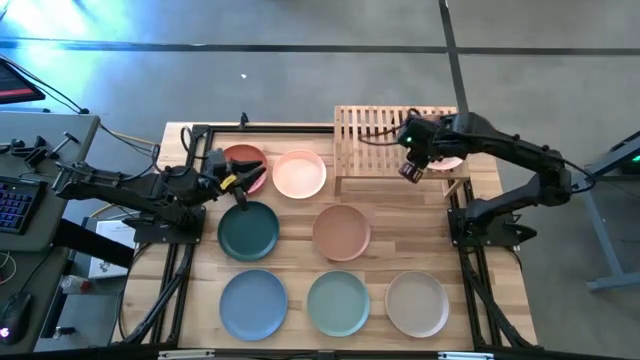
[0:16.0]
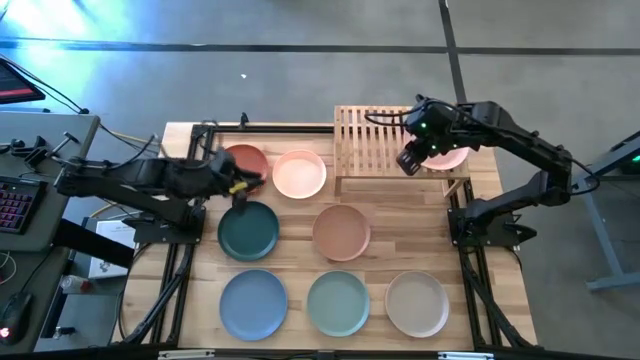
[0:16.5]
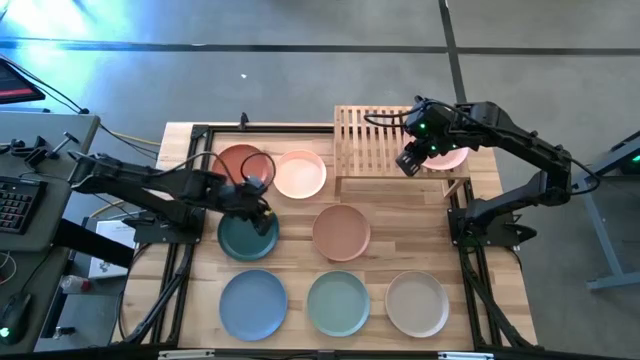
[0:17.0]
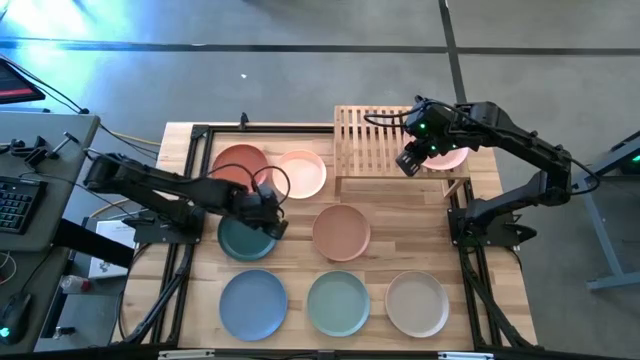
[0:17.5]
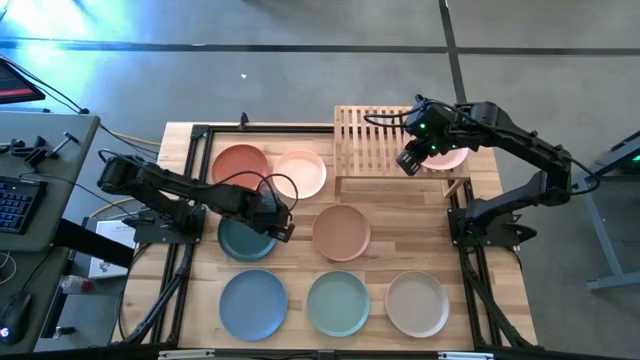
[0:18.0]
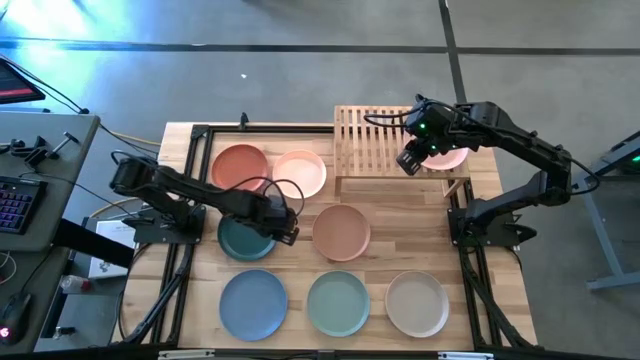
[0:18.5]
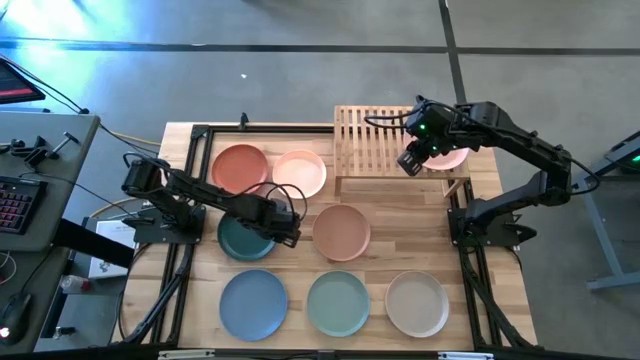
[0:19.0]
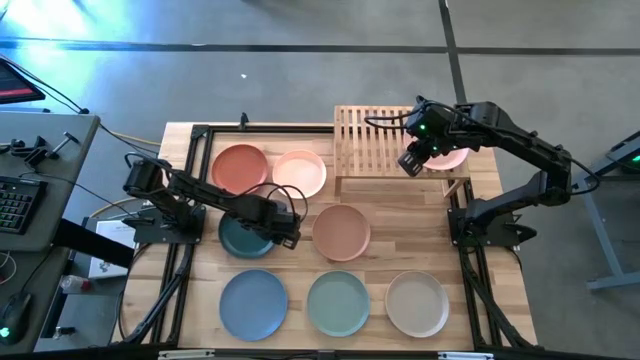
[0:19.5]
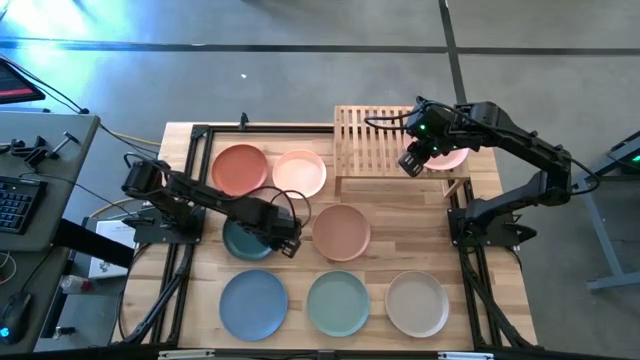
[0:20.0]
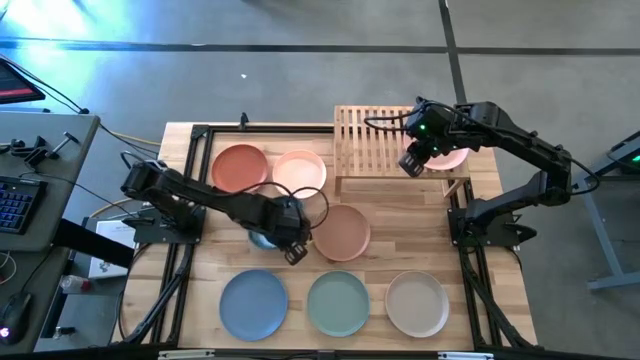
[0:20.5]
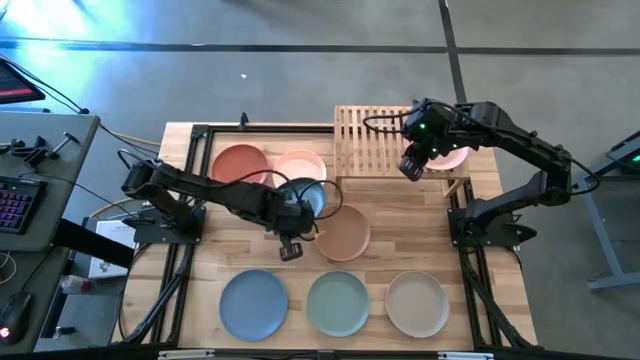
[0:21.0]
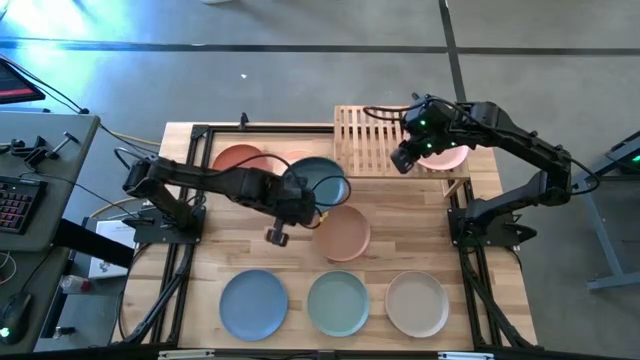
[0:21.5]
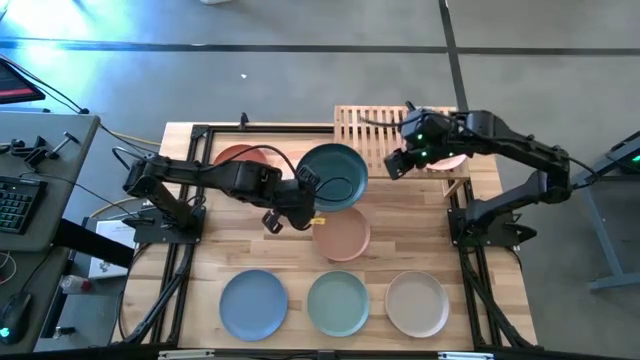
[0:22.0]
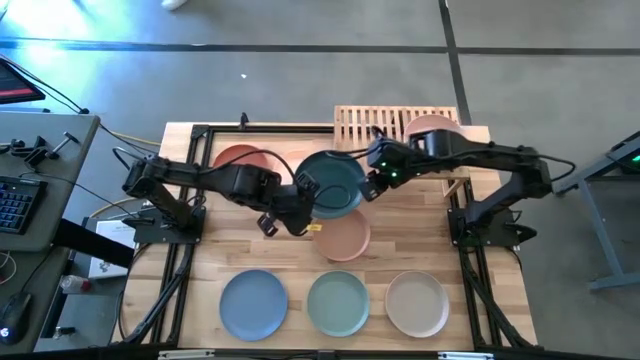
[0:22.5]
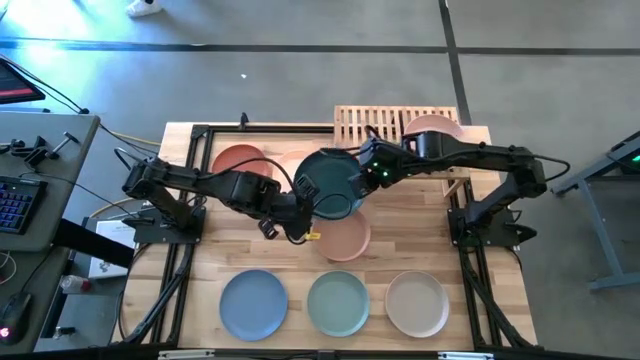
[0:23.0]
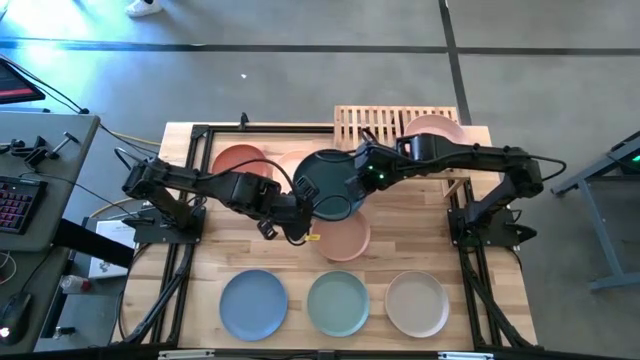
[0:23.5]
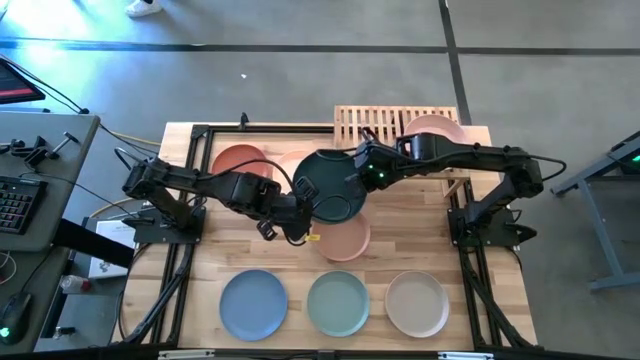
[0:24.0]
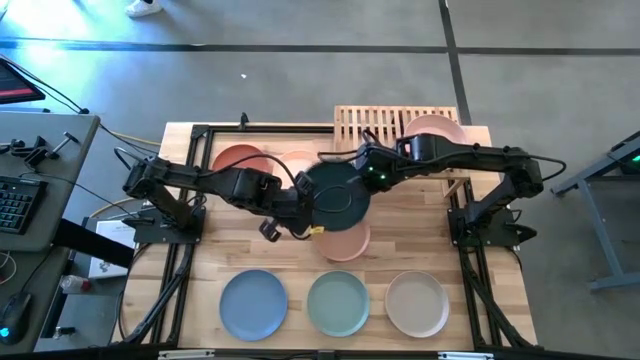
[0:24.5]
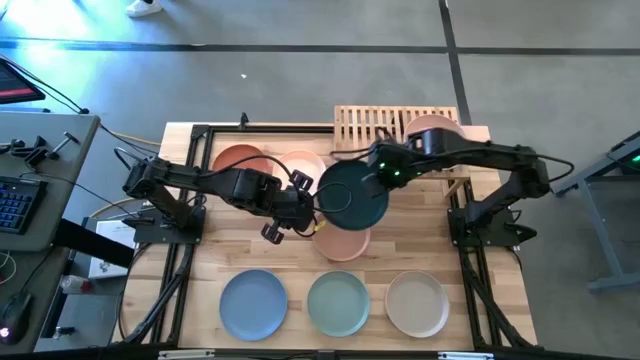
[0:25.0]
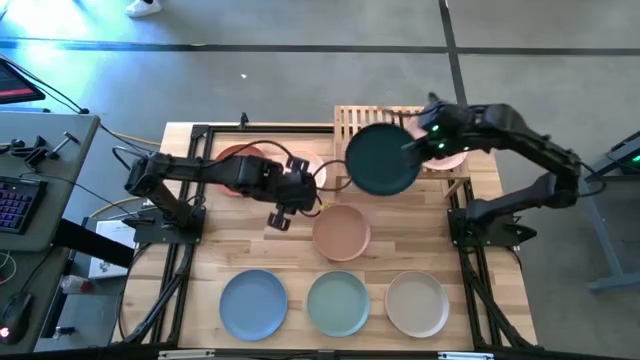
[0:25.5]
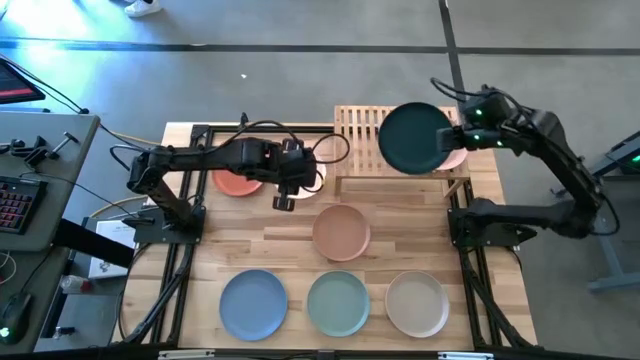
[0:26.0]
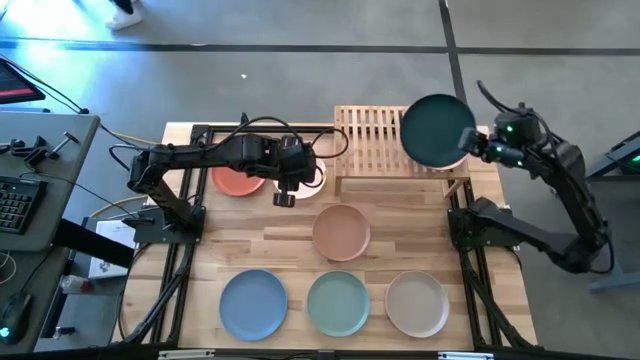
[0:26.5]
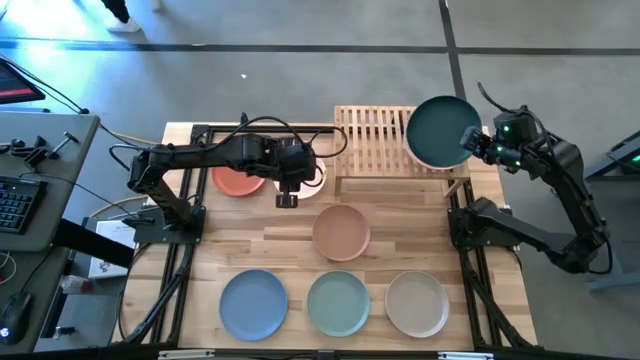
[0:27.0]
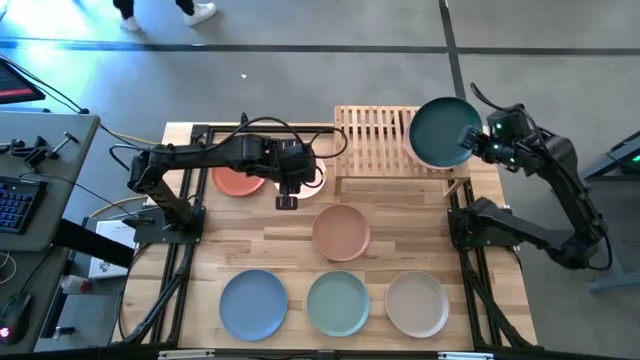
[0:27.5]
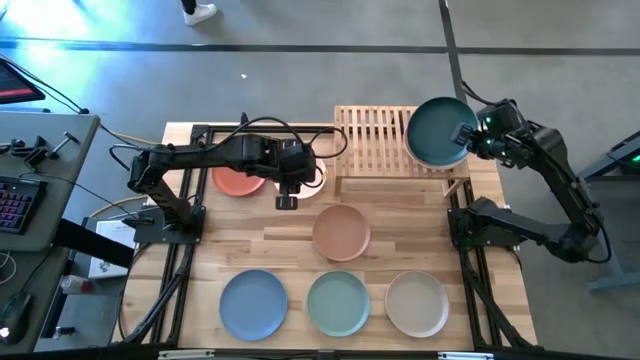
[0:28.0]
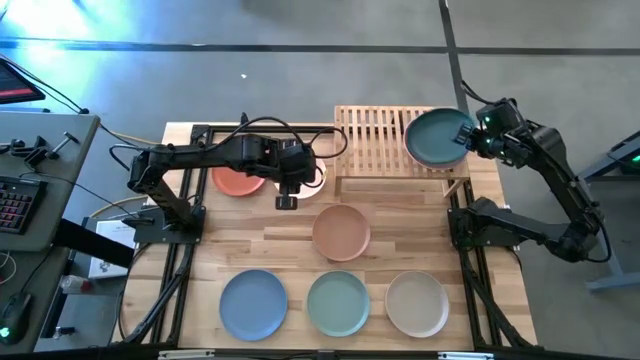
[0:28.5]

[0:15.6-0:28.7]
Task: Place and stack plates onto a shelf
Stack the green plate on top of the light pink plate on the shelf

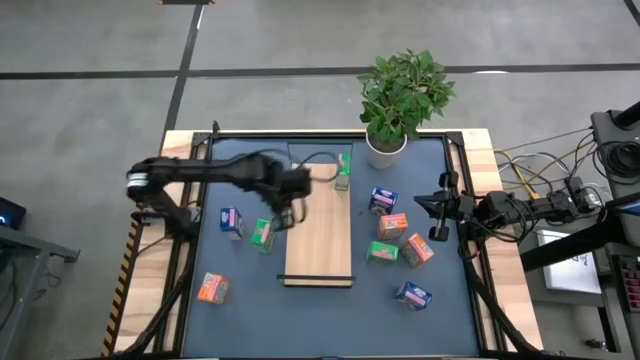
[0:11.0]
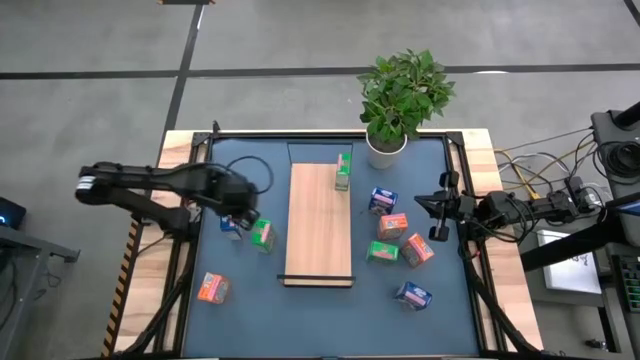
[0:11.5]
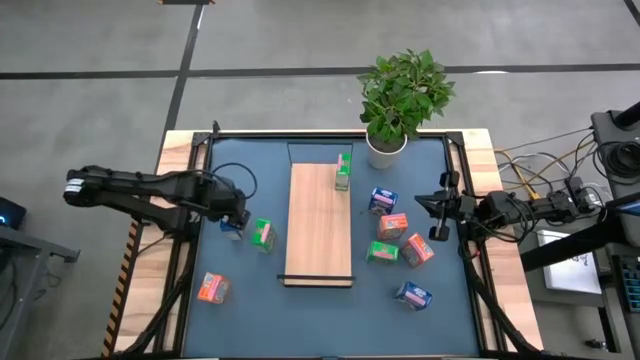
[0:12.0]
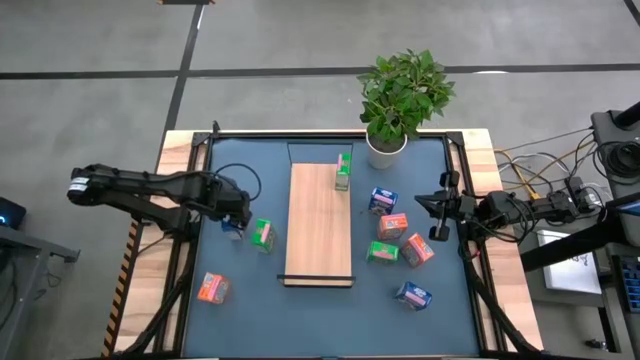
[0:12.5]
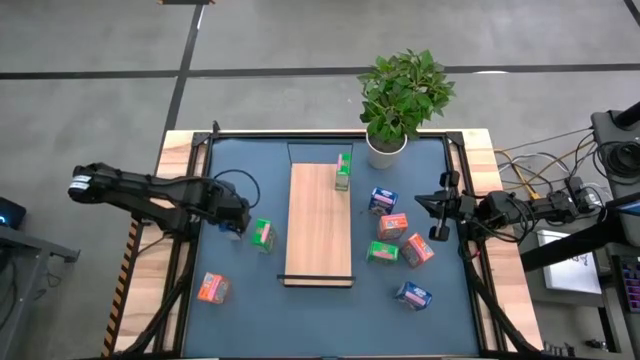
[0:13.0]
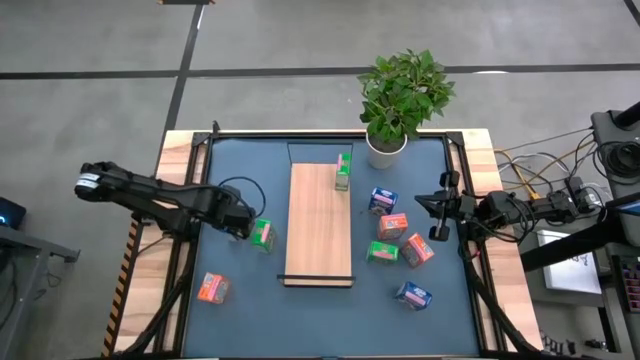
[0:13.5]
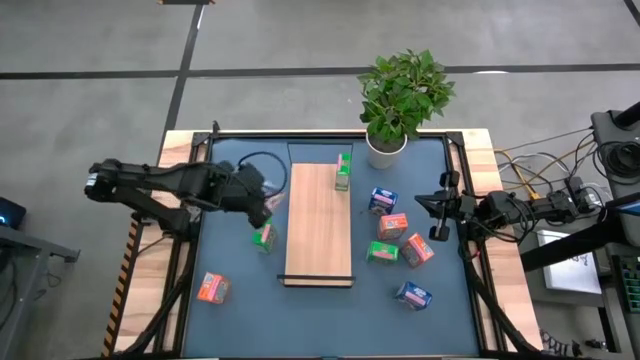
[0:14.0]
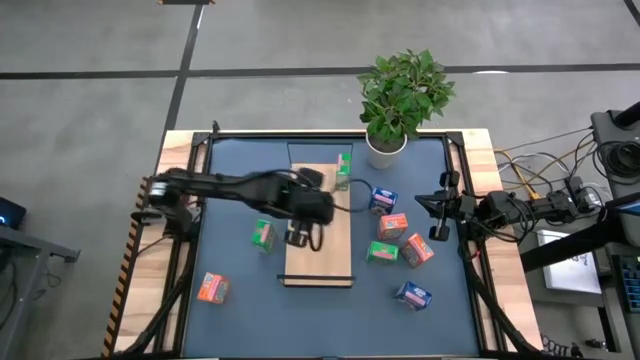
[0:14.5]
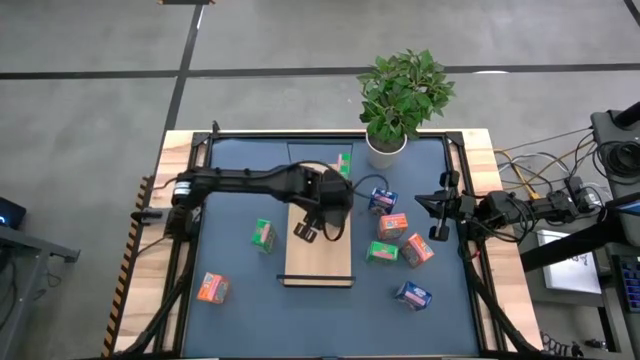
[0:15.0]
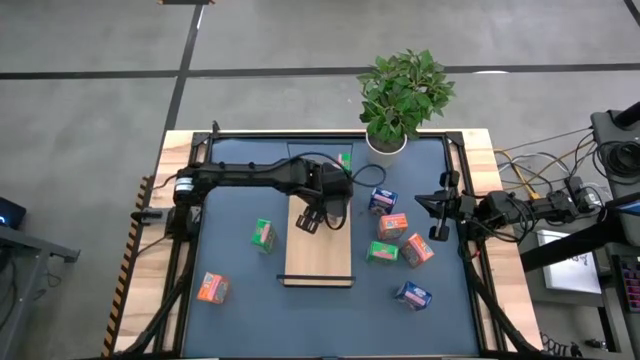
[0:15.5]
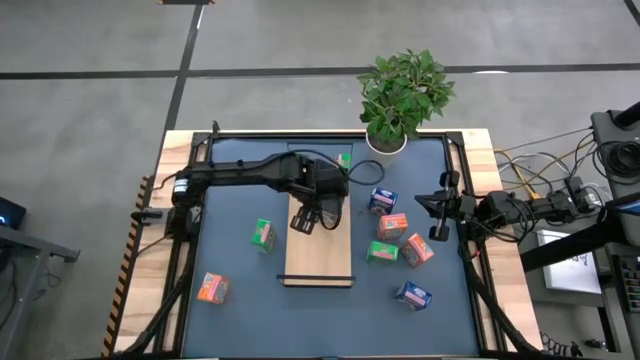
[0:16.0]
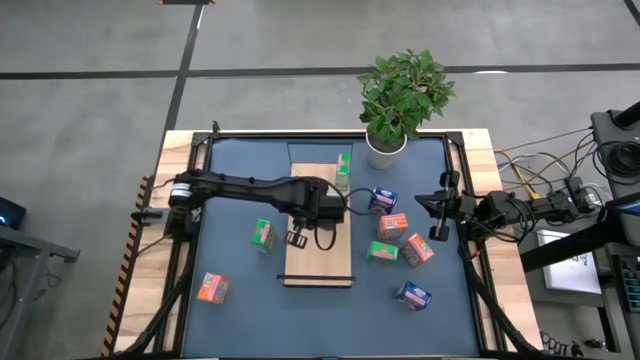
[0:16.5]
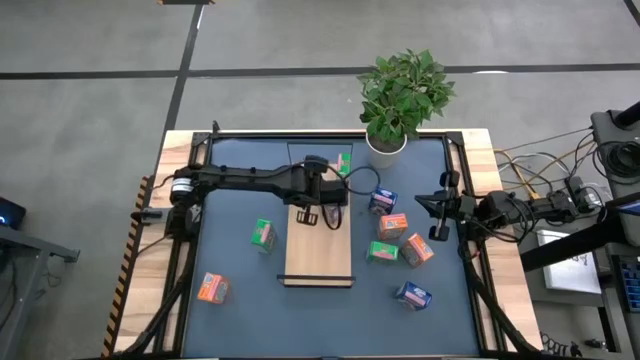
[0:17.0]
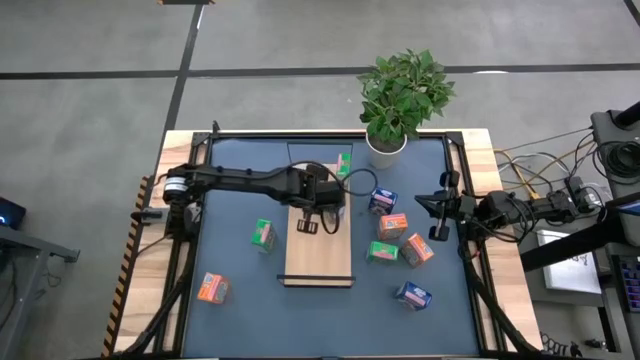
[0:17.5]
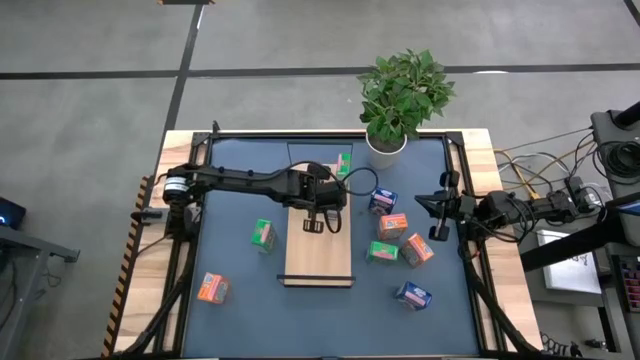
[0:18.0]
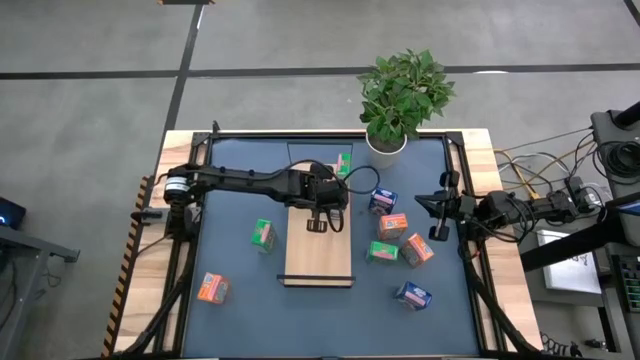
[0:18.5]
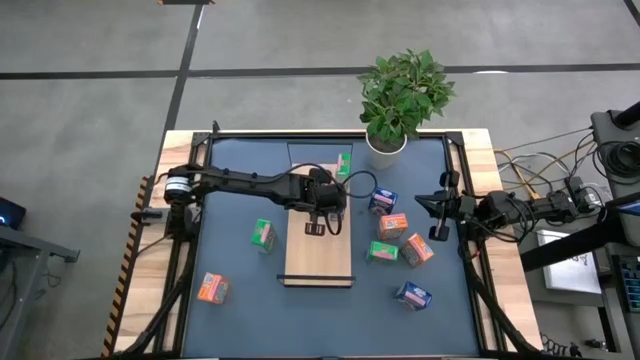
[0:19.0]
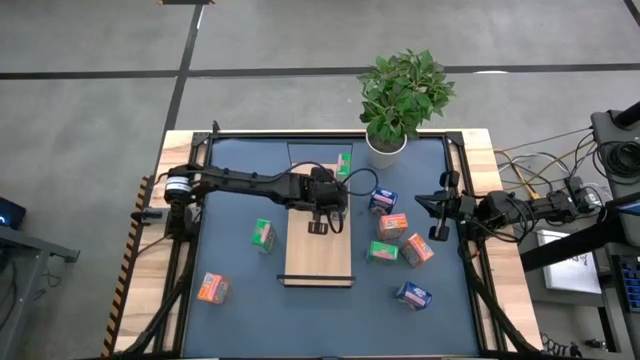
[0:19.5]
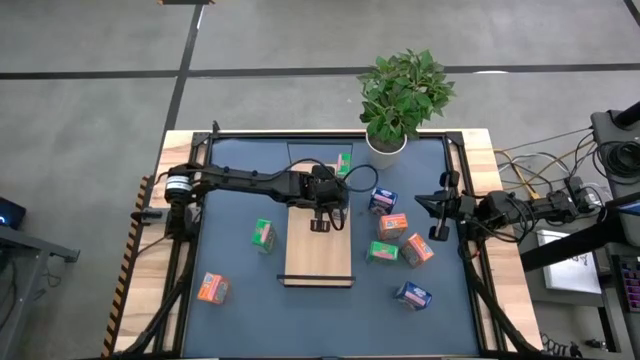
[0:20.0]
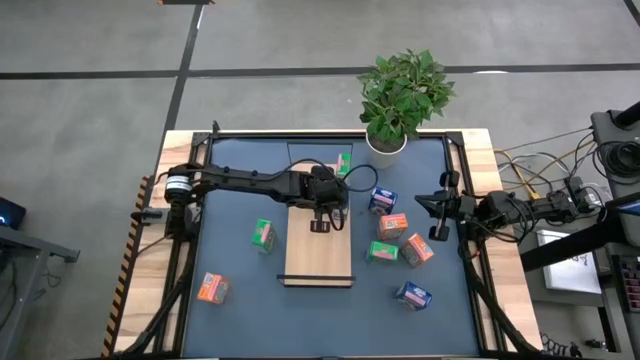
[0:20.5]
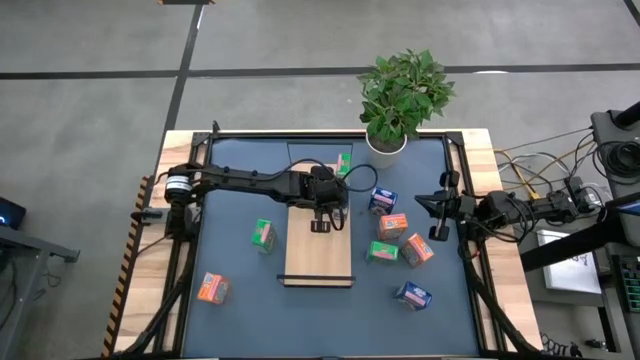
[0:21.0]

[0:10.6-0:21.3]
Task: Stack cereal on shelf
Put the top left blue cereal box on the shelf
